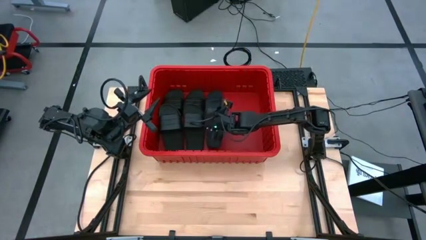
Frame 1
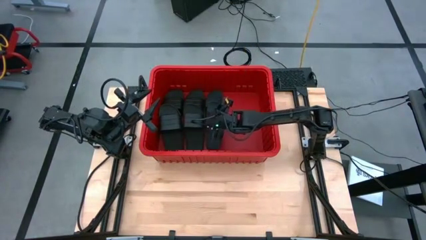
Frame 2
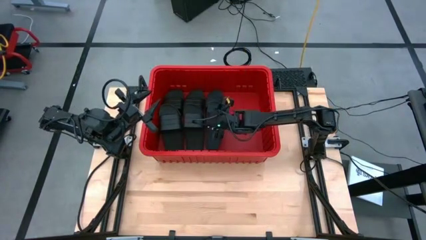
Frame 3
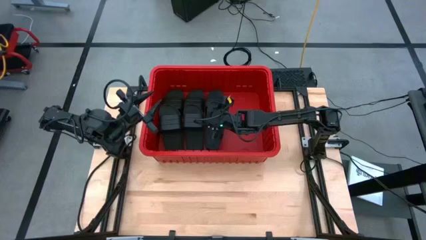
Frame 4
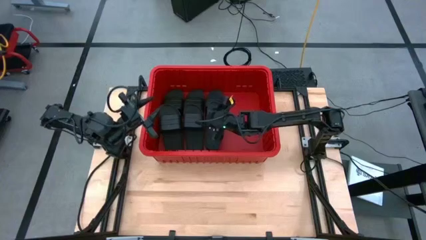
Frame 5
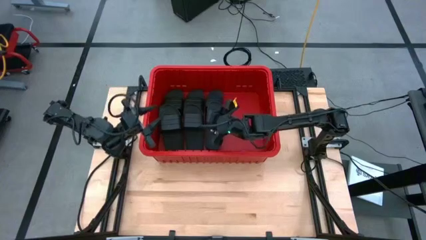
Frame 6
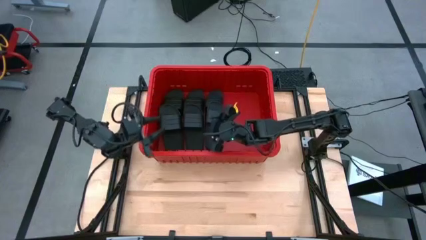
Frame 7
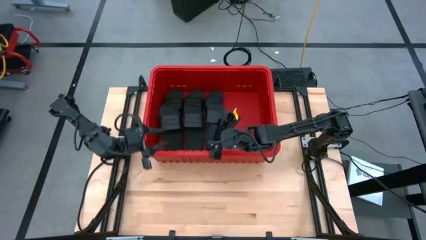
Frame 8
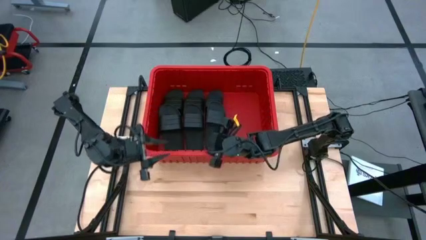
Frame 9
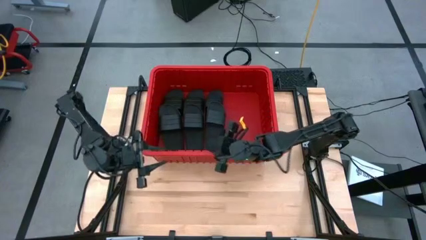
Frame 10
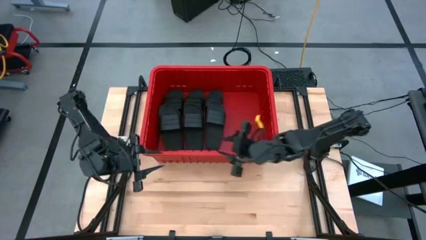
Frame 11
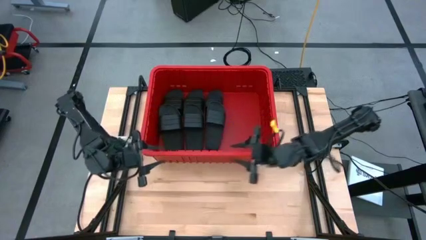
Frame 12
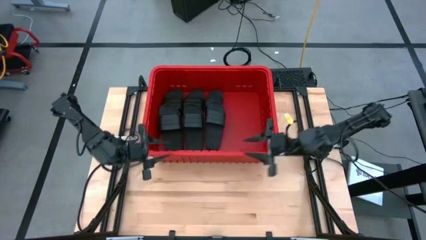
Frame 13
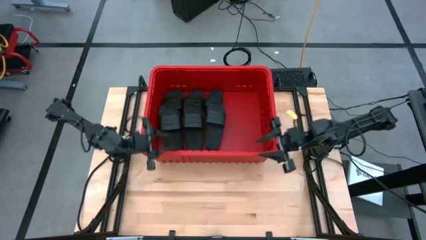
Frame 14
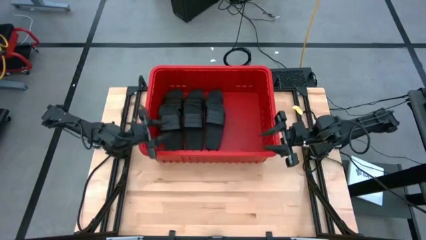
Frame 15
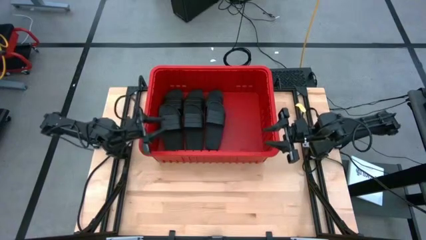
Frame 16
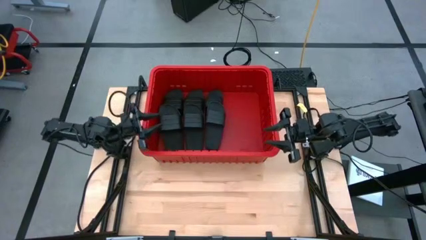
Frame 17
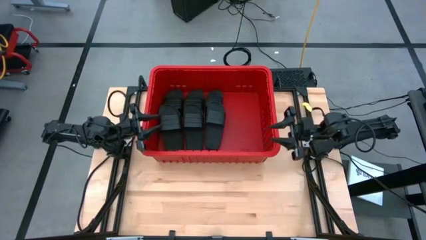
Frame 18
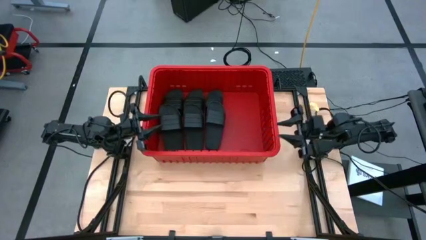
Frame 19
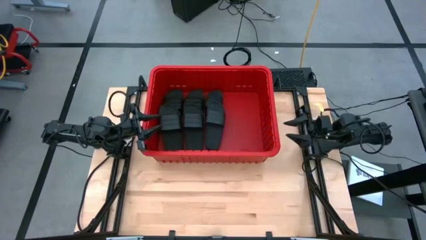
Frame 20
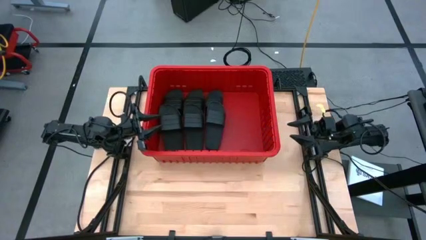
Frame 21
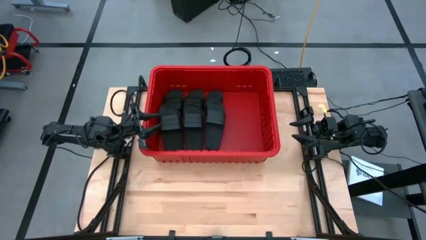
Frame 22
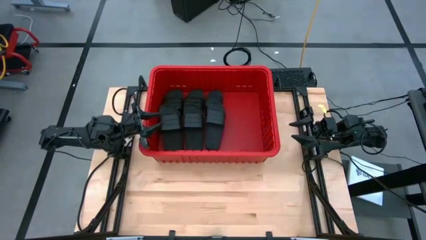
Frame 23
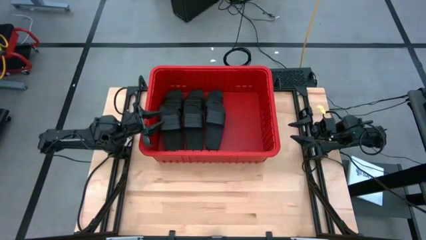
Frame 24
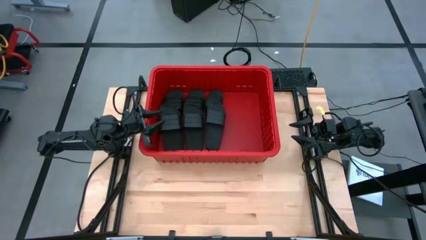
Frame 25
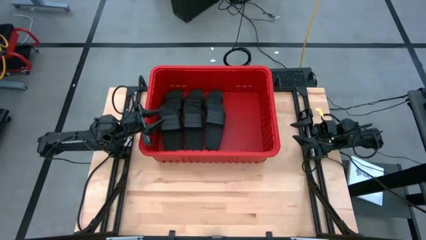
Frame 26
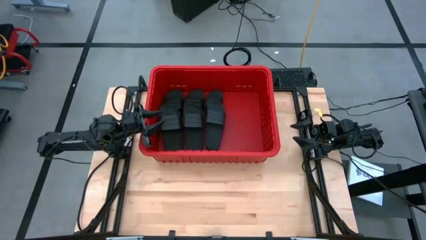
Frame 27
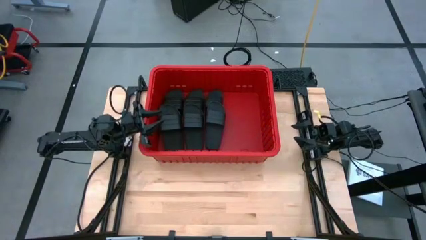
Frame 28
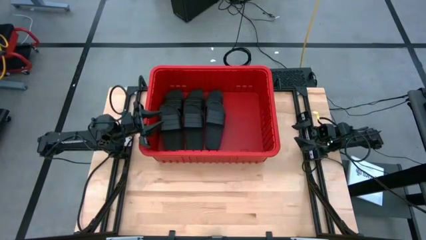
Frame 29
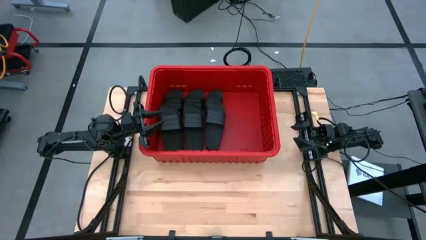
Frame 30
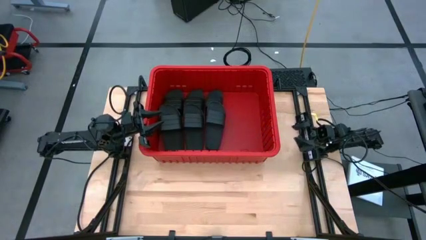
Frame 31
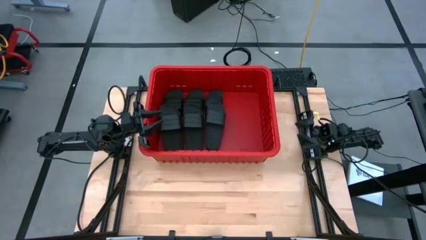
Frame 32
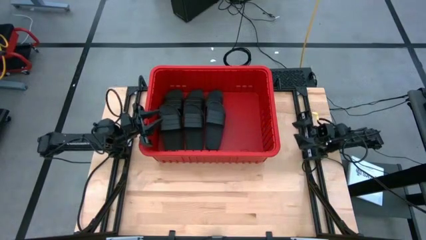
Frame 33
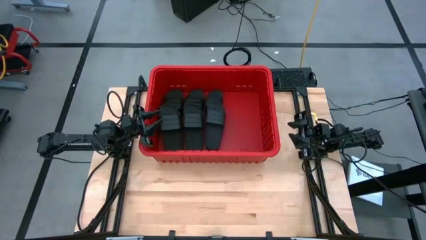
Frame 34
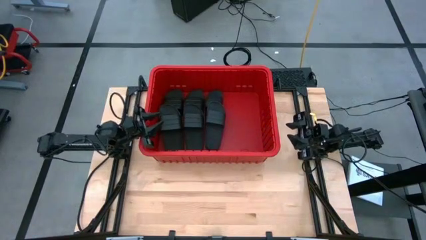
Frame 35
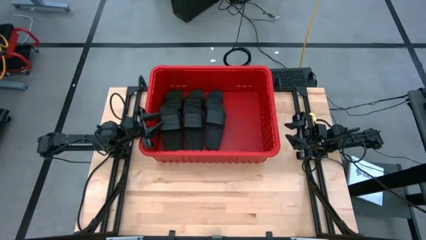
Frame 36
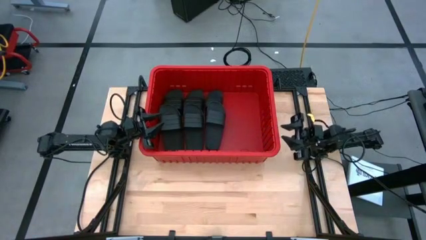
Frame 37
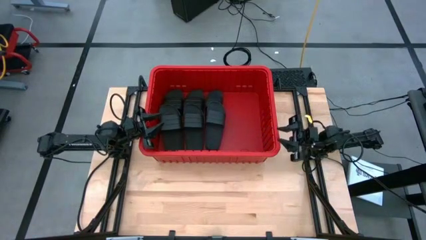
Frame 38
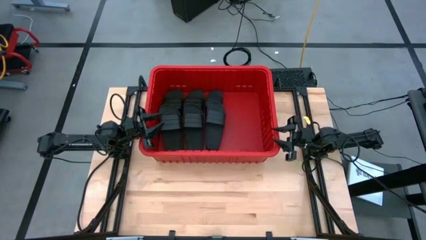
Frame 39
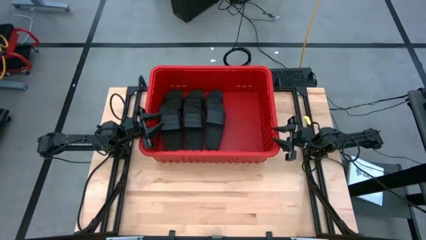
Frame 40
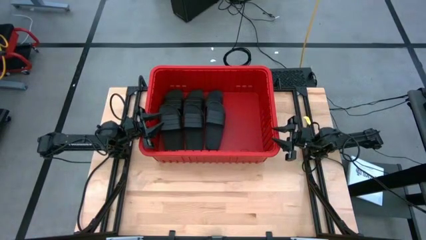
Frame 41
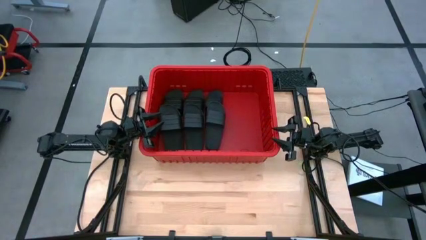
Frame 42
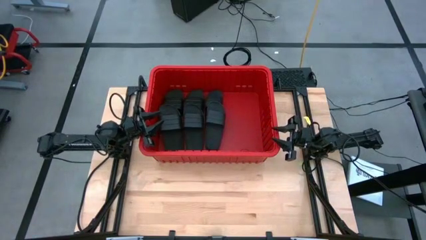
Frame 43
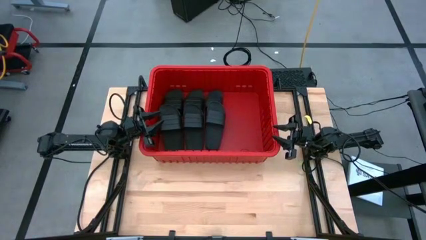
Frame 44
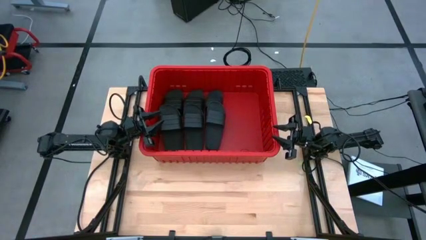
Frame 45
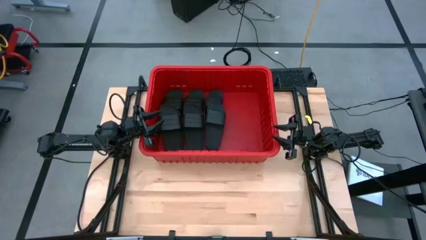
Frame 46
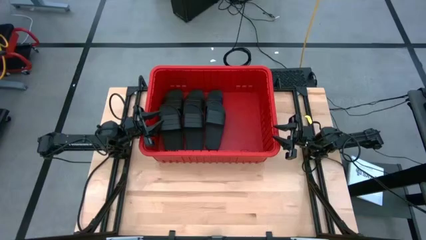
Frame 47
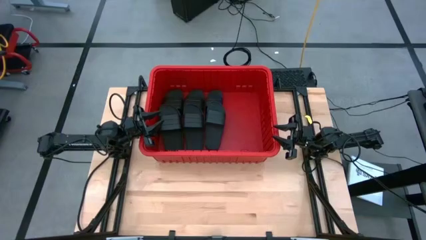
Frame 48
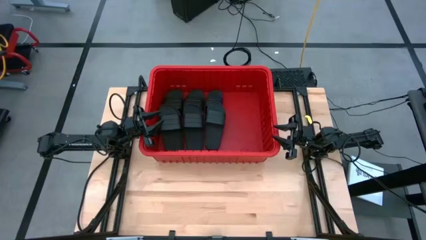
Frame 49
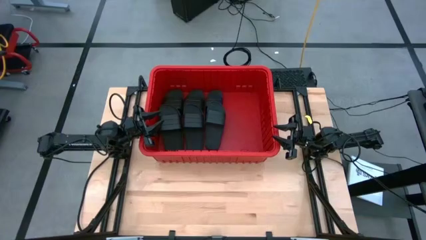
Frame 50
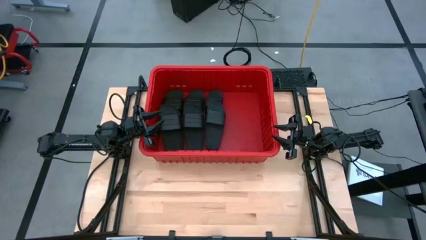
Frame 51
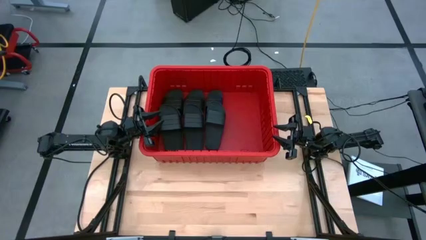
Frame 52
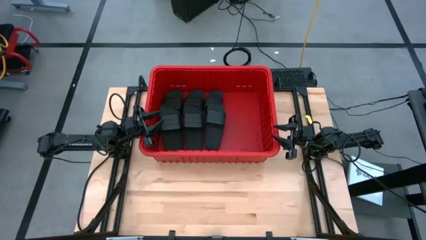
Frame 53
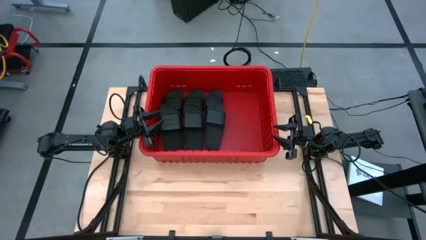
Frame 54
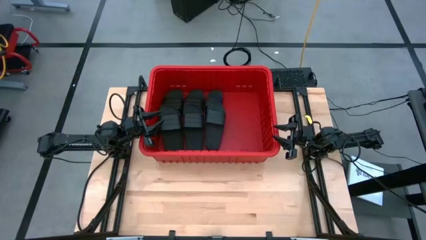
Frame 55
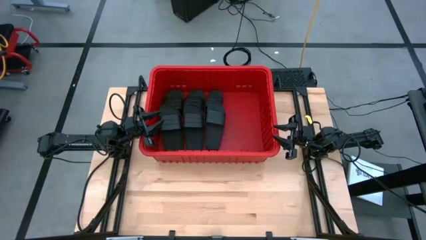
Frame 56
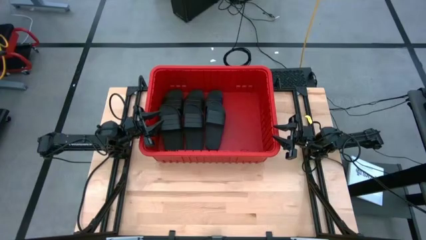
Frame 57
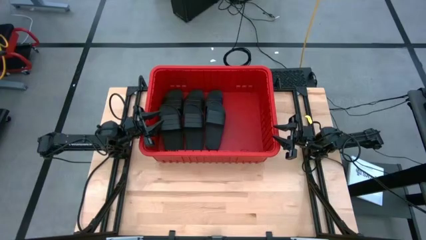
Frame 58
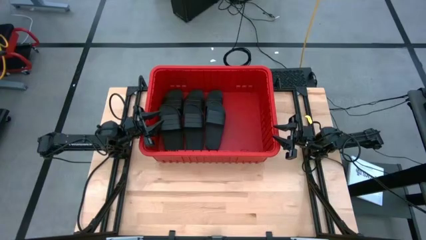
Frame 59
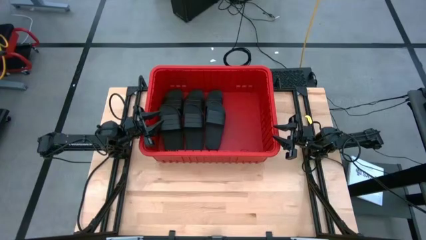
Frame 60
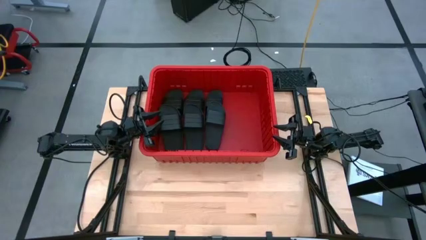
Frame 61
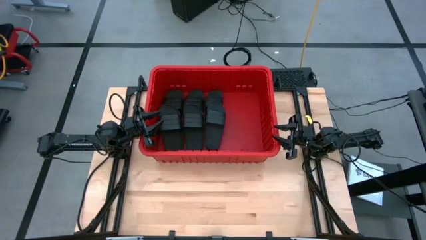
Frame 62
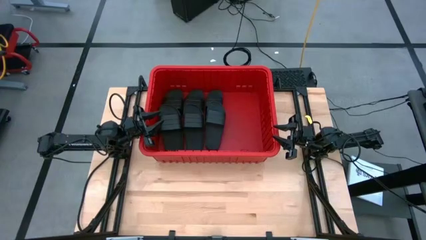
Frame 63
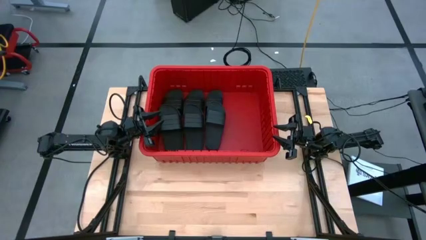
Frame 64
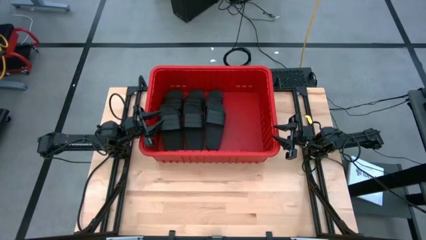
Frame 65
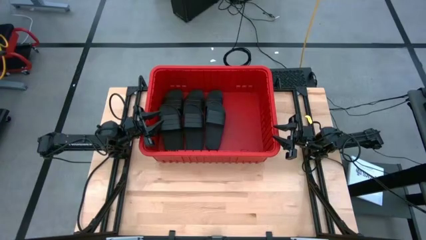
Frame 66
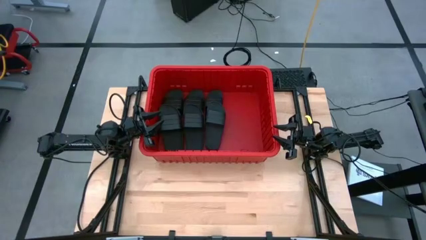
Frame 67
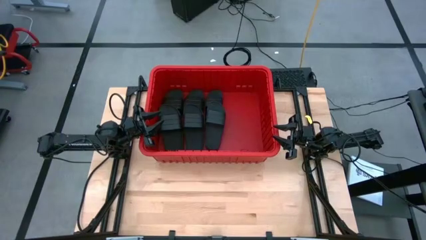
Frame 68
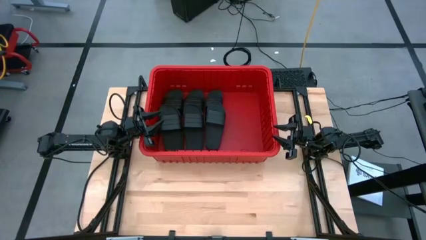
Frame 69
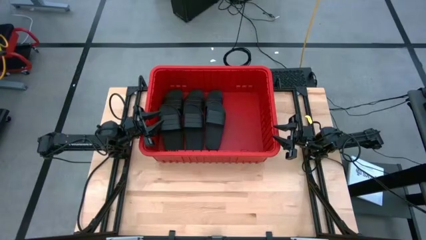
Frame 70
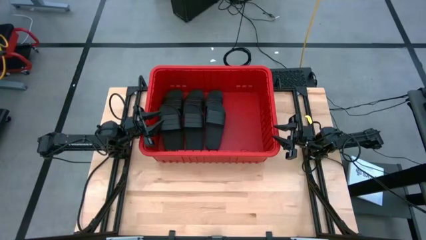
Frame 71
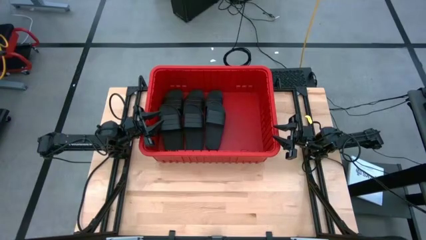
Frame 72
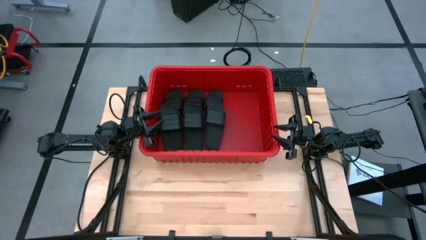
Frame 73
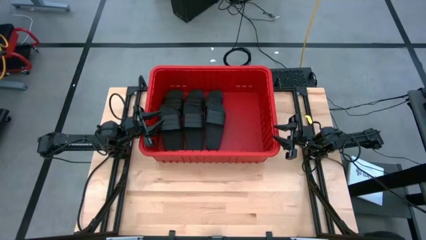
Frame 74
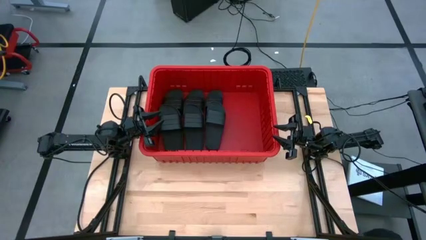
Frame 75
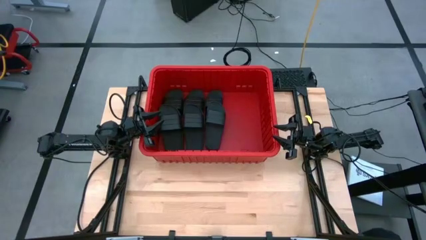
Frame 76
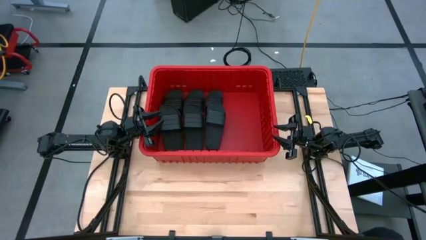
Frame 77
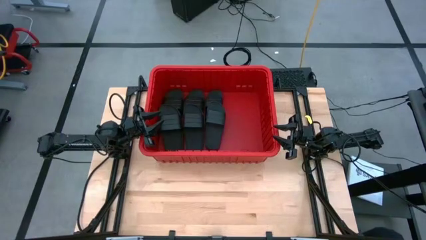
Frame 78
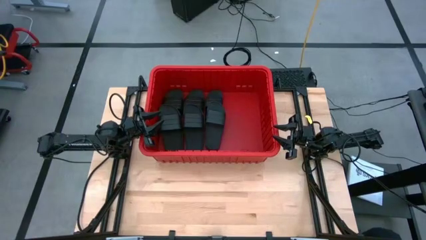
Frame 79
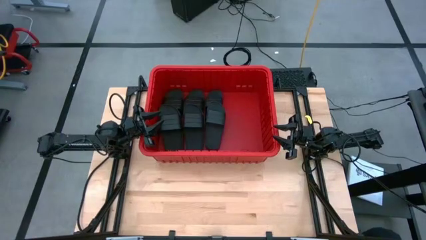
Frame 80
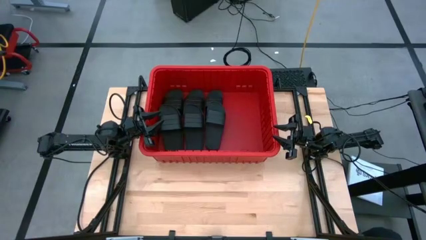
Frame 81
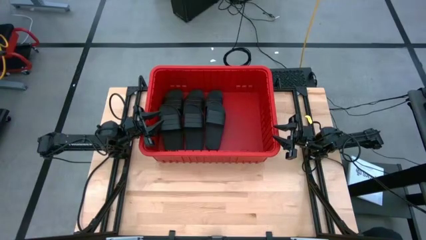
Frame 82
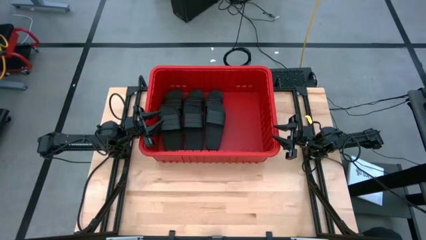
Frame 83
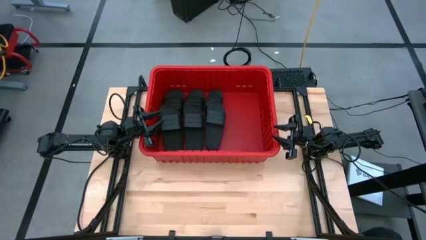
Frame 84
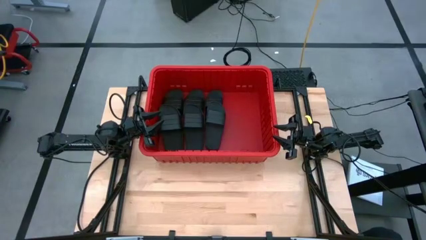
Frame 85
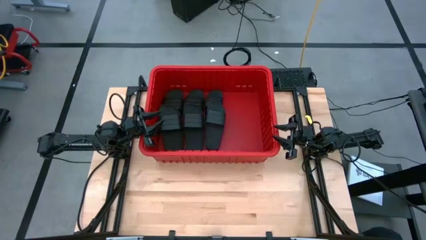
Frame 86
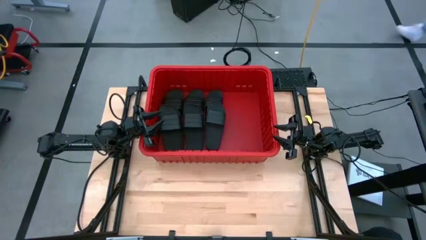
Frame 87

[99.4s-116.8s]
Task: Pick and place slides into bin
Return to Home Position
